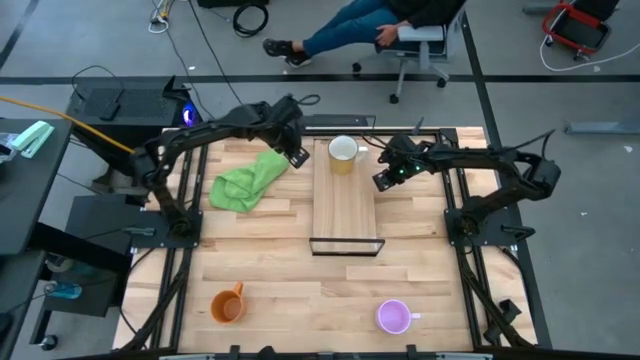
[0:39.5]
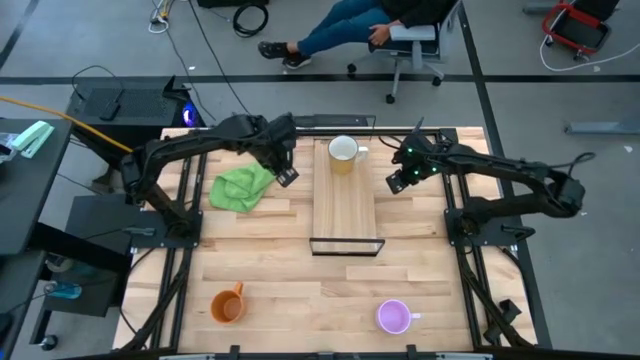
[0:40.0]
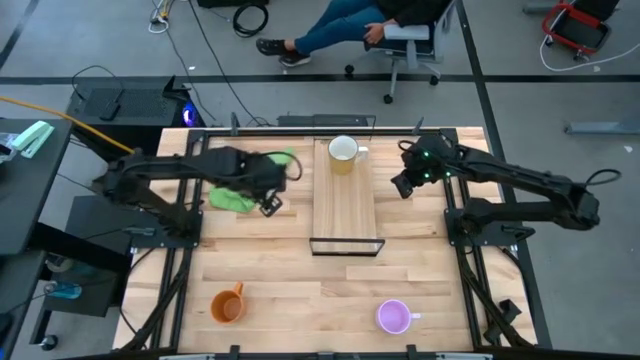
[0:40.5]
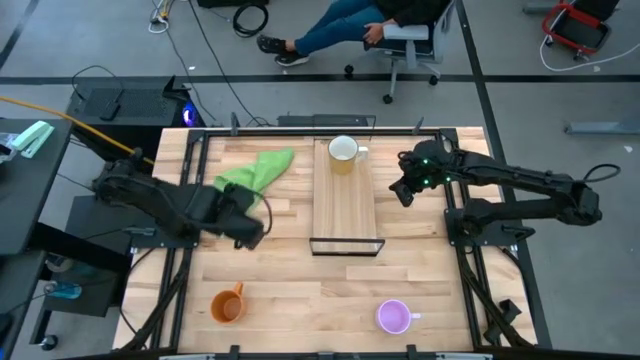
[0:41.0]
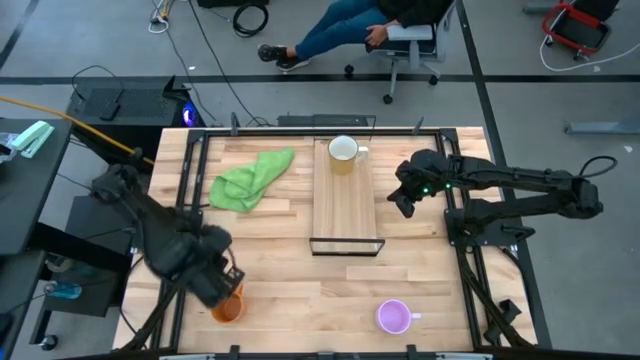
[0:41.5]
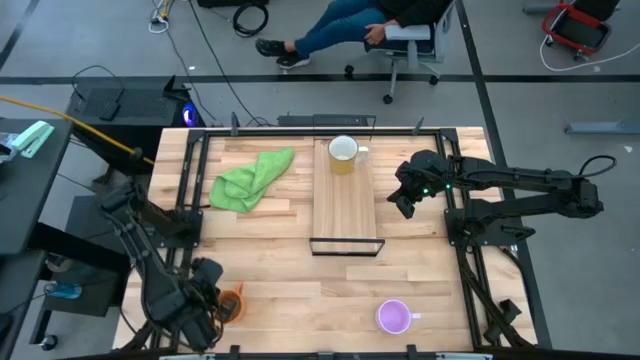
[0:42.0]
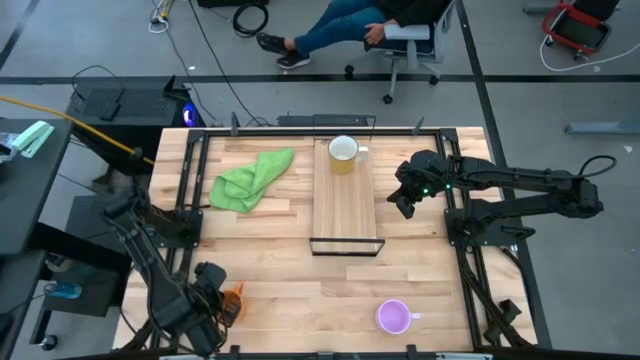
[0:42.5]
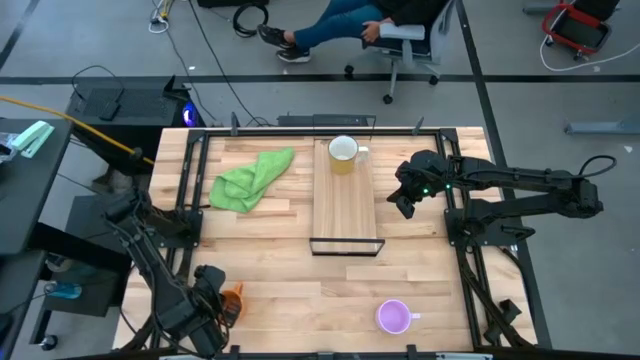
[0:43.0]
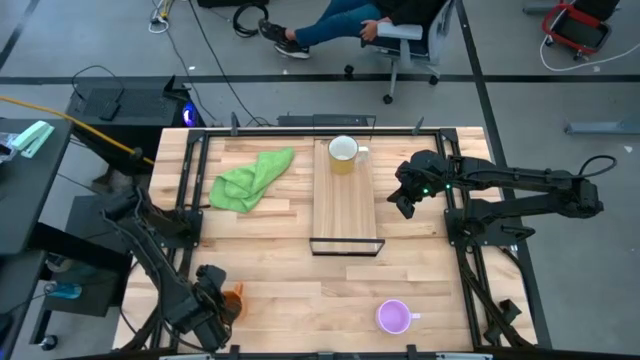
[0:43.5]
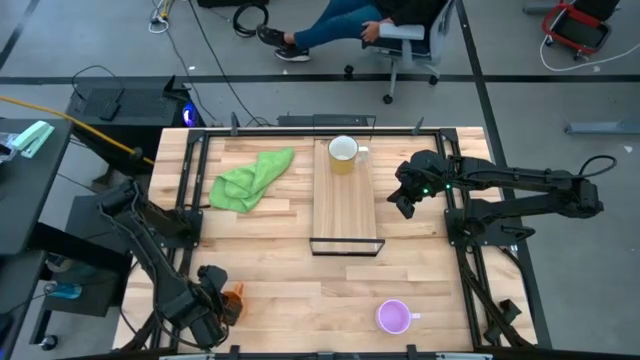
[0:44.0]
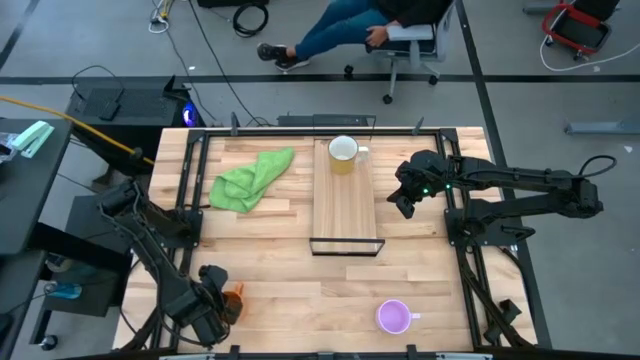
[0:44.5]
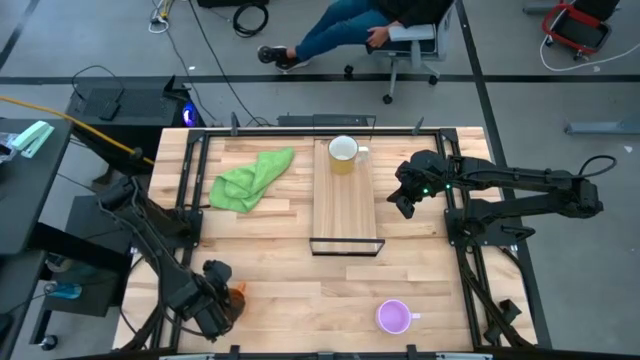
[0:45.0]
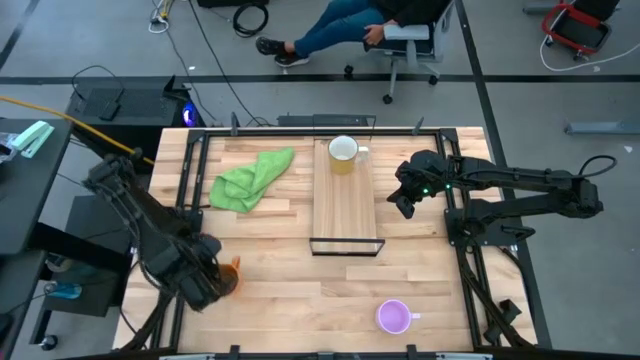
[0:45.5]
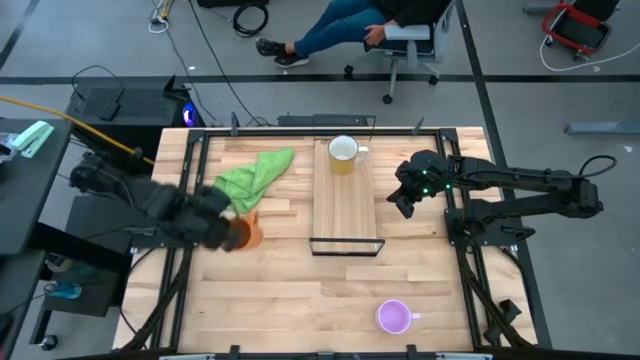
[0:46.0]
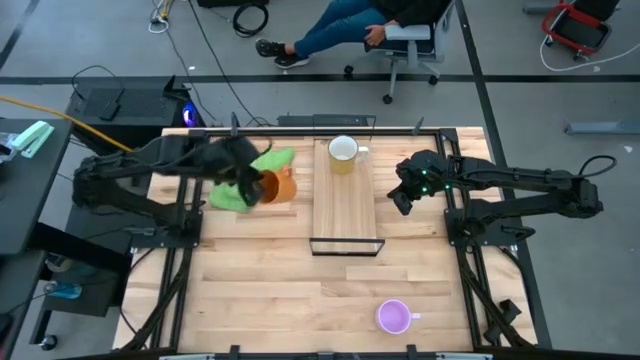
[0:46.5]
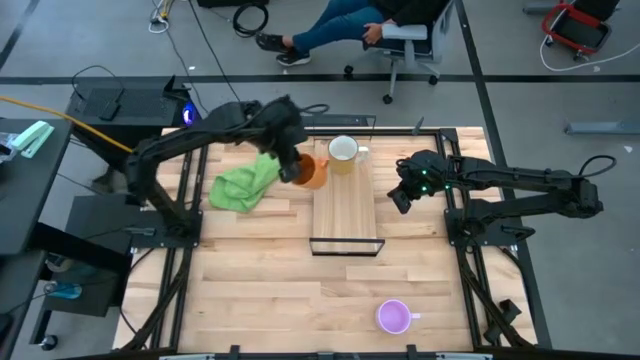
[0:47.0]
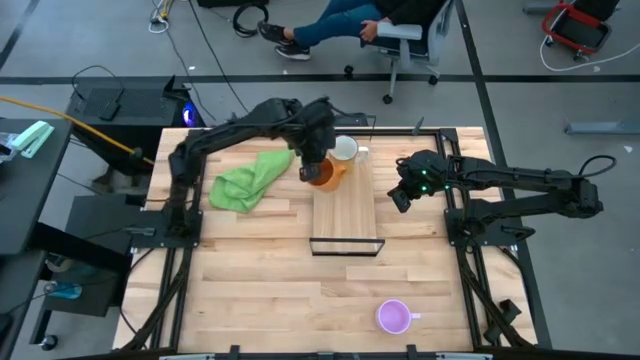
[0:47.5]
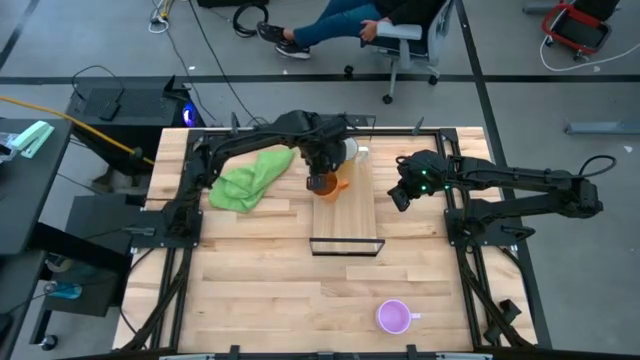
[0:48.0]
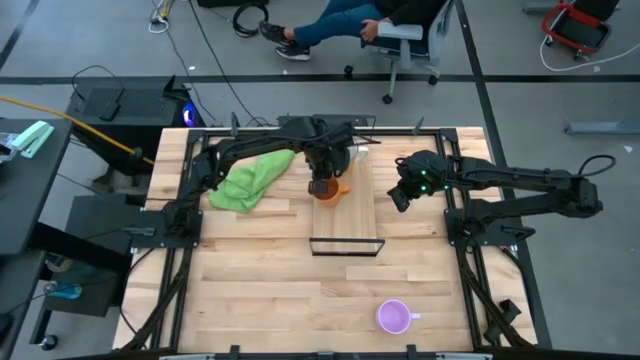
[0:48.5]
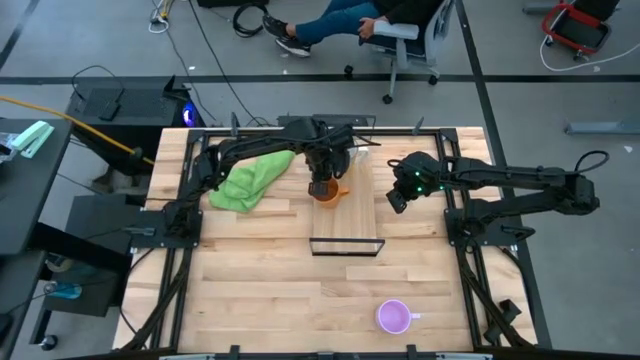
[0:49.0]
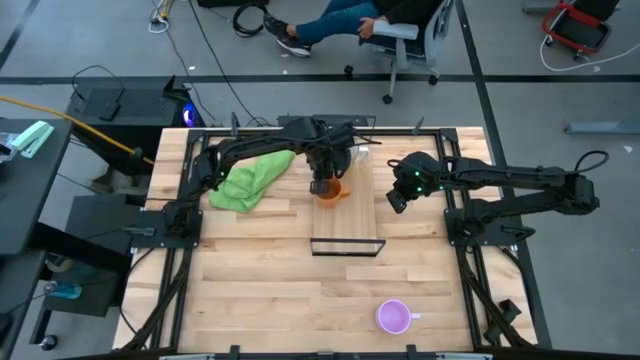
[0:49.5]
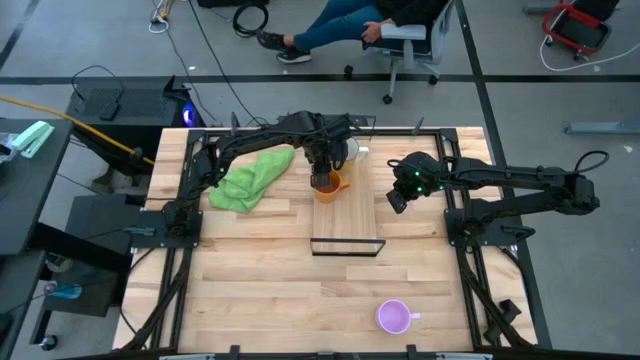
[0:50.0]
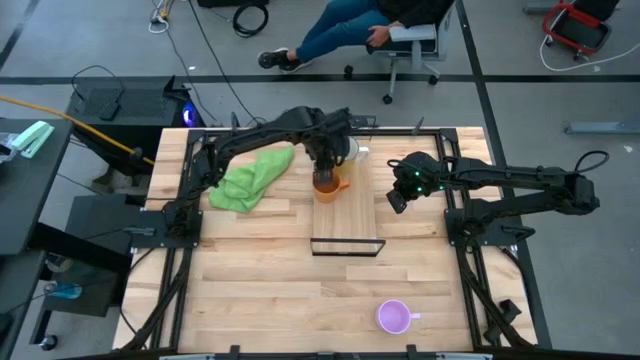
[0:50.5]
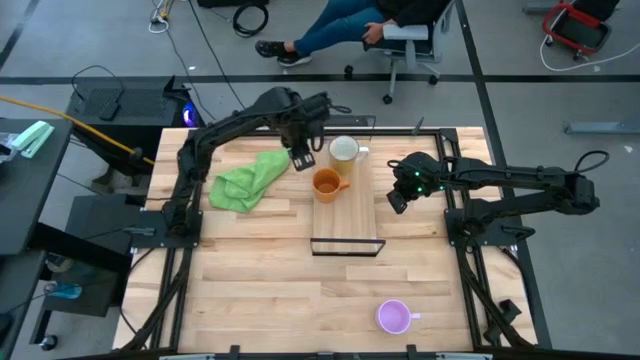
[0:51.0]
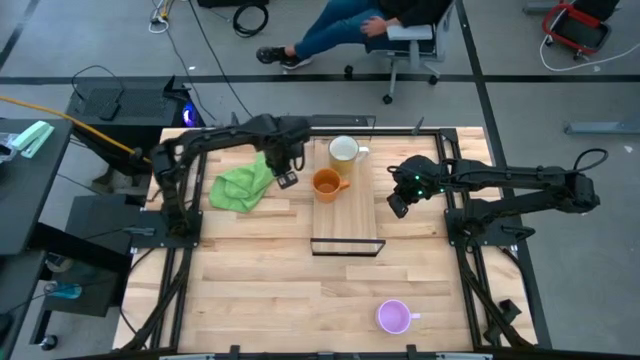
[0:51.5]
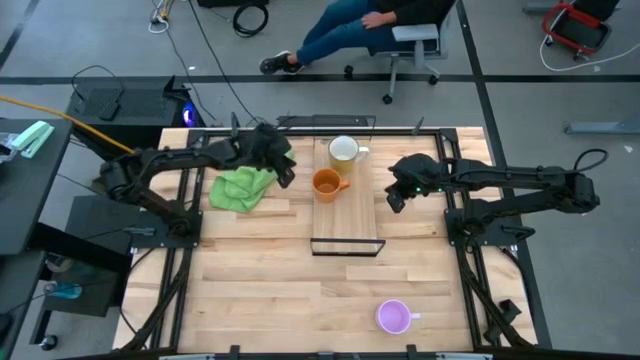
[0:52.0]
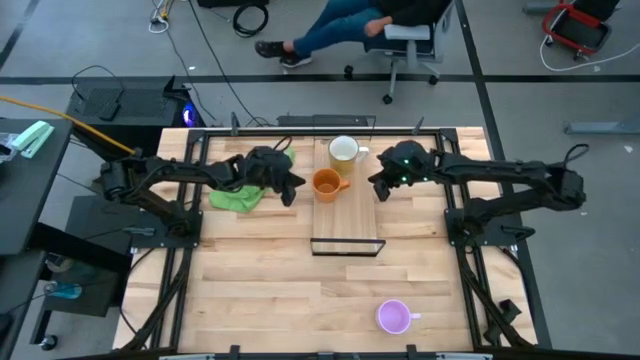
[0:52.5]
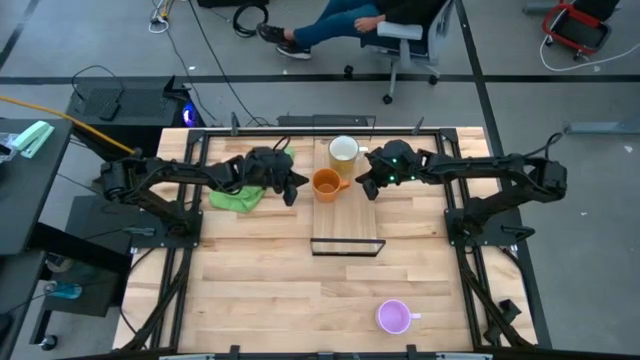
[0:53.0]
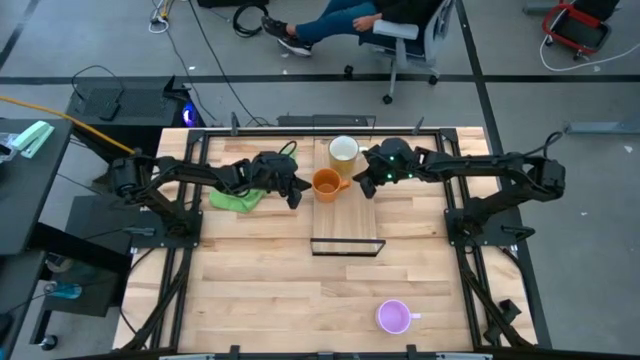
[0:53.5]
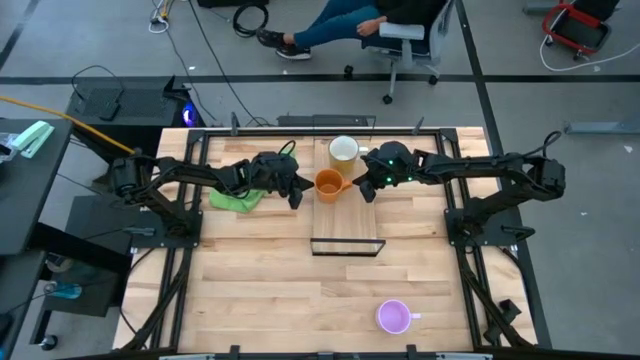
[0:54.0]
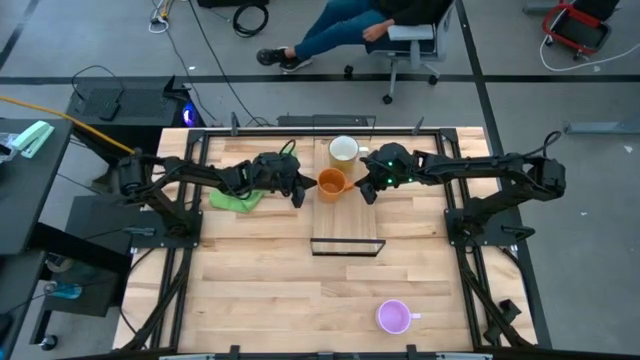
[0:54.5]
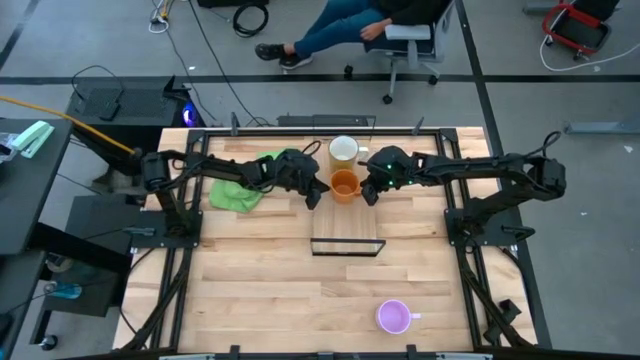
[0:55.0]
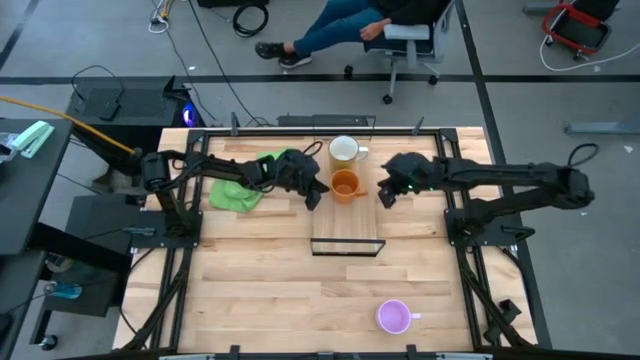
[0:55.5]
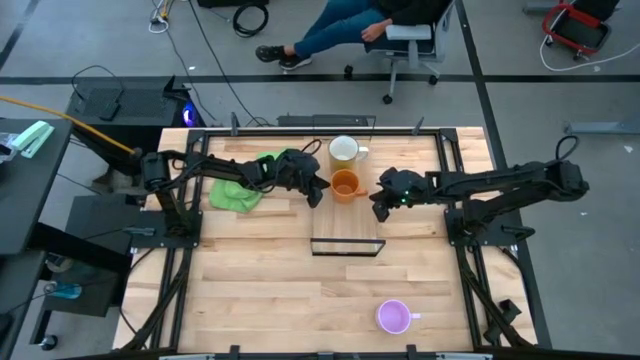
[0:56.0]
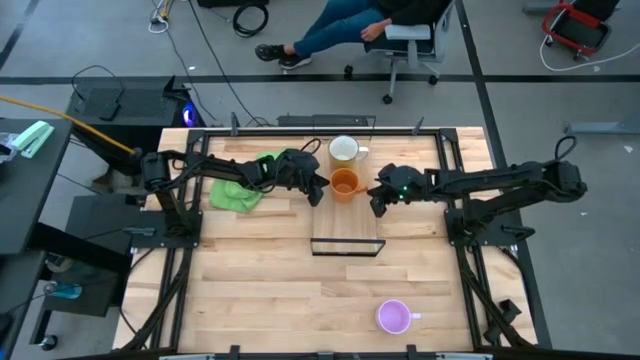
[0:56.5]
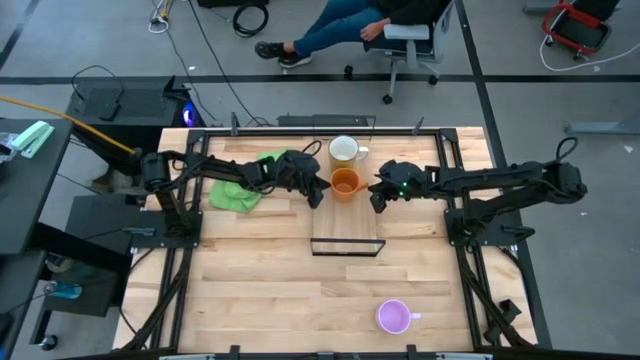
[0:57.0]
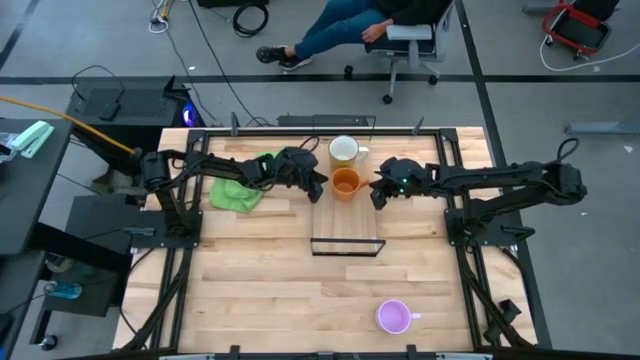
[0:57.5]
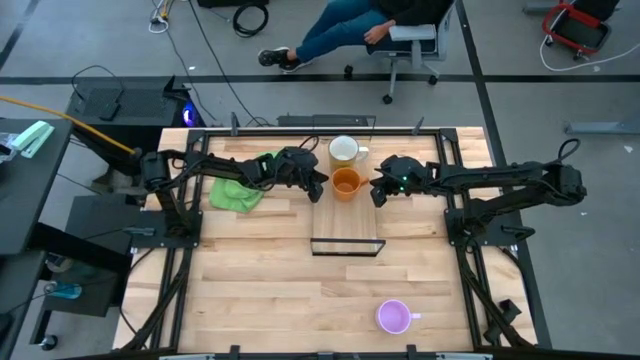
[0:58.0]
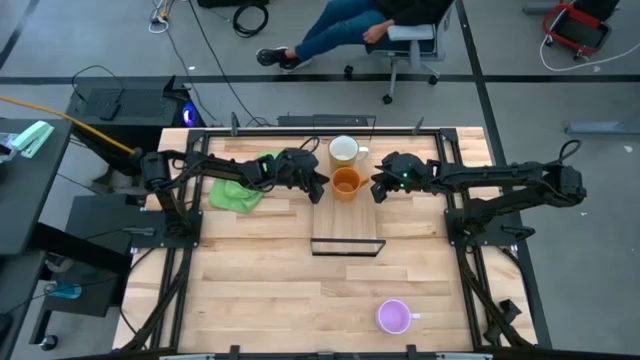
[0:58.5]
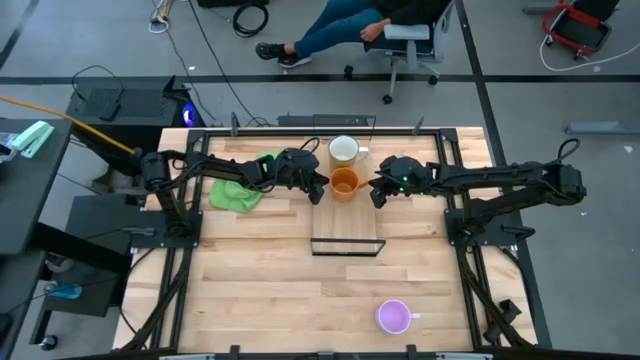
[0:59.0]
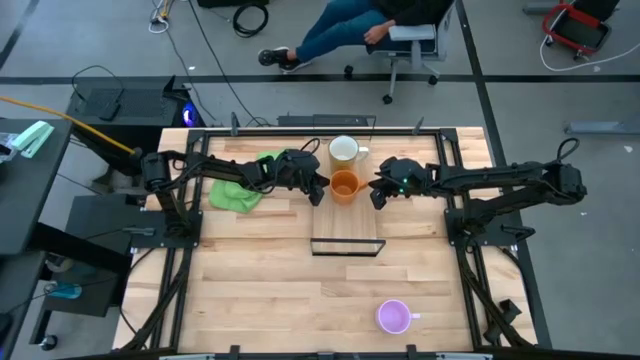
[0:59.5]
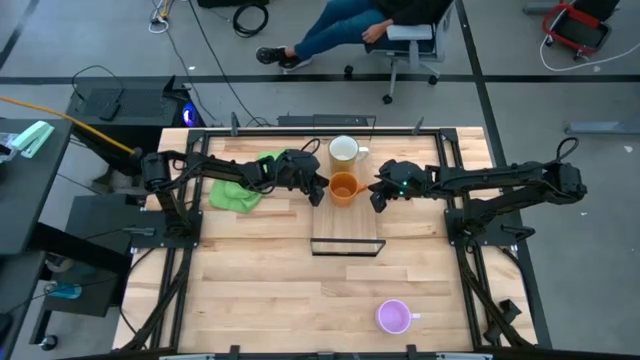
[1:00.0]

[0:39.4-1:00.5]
Task: Stack small to large cups/mugs on shelf
Put the orange mug on the shelf
